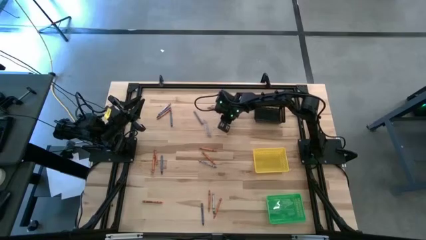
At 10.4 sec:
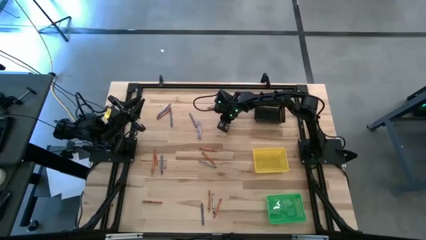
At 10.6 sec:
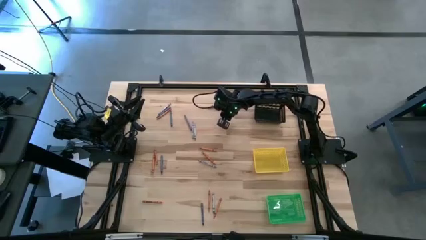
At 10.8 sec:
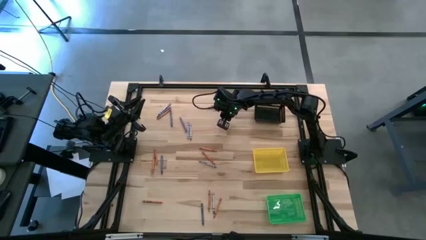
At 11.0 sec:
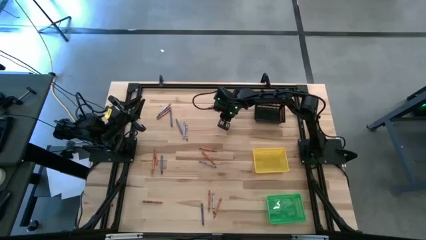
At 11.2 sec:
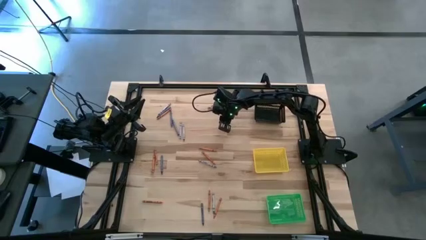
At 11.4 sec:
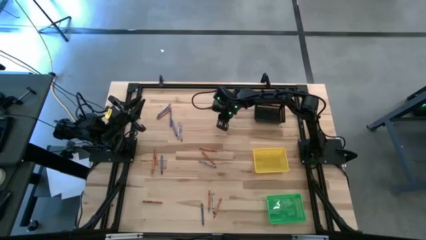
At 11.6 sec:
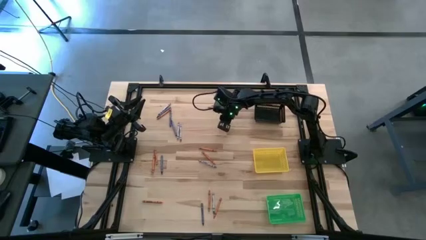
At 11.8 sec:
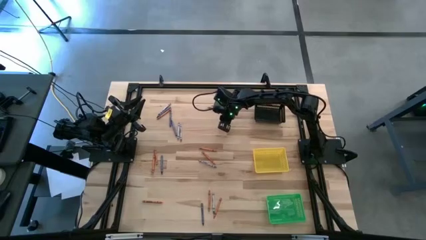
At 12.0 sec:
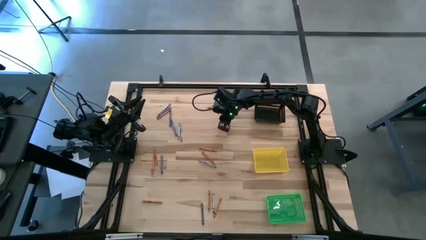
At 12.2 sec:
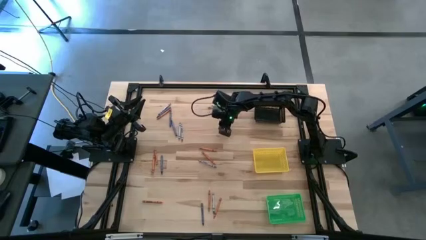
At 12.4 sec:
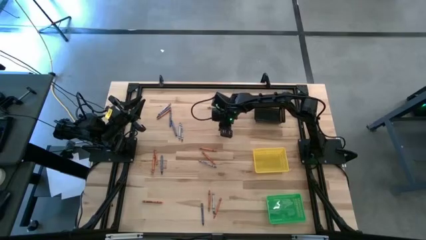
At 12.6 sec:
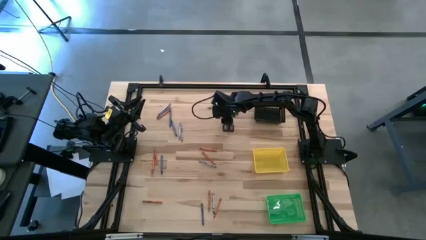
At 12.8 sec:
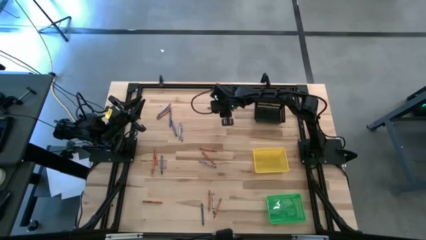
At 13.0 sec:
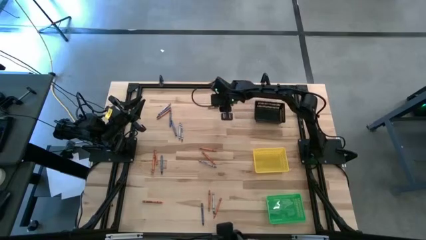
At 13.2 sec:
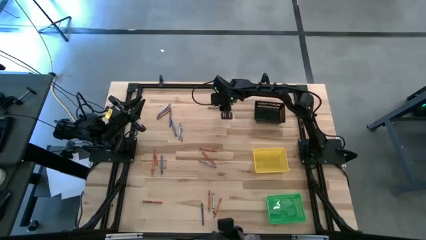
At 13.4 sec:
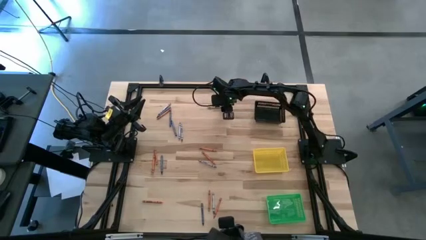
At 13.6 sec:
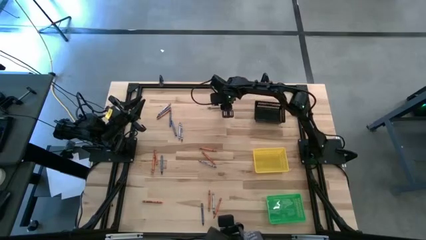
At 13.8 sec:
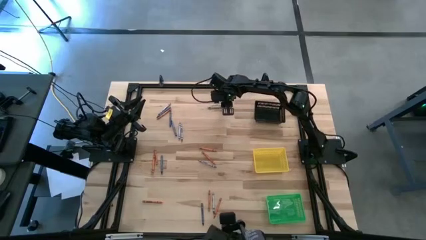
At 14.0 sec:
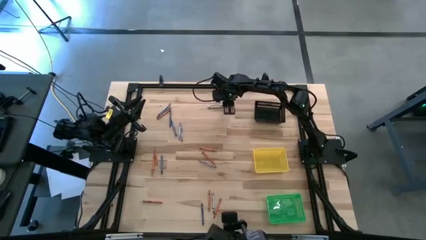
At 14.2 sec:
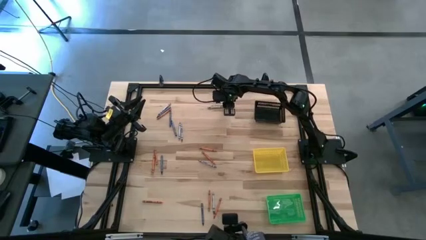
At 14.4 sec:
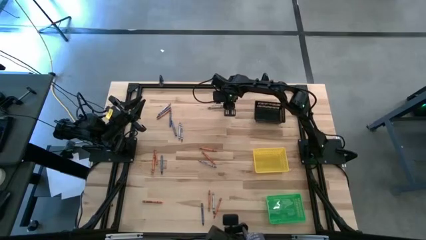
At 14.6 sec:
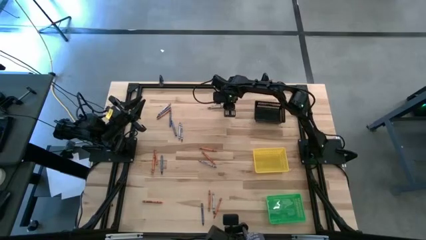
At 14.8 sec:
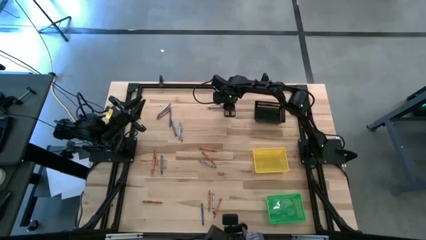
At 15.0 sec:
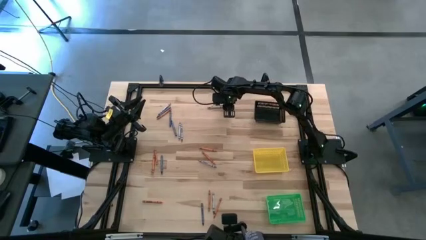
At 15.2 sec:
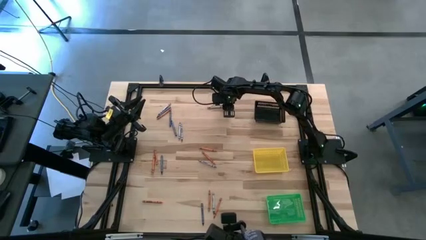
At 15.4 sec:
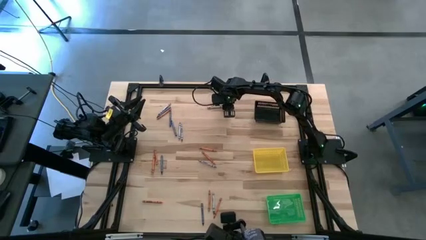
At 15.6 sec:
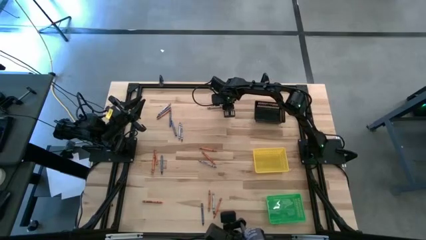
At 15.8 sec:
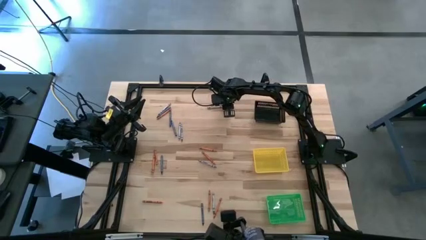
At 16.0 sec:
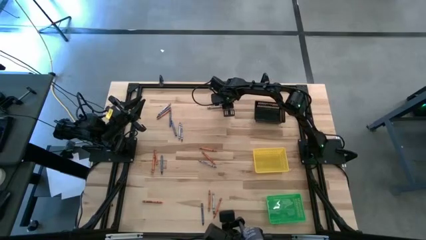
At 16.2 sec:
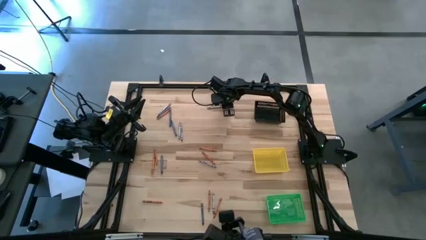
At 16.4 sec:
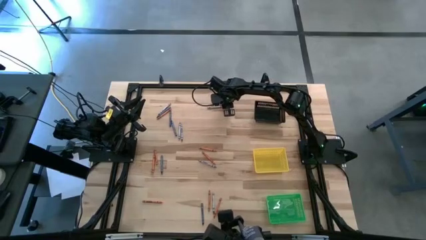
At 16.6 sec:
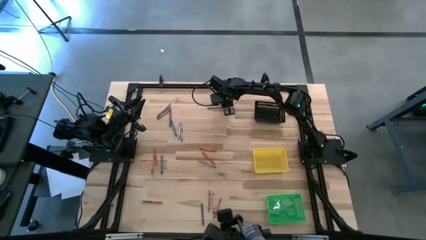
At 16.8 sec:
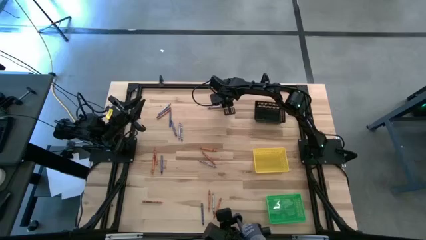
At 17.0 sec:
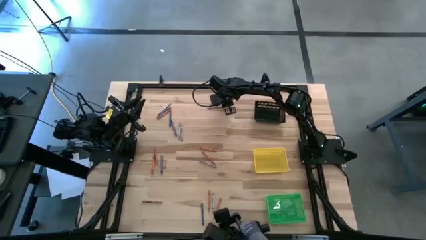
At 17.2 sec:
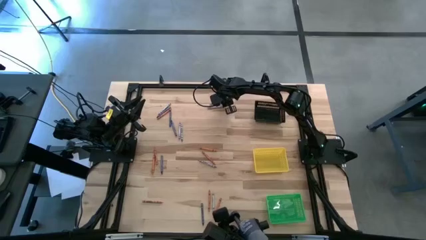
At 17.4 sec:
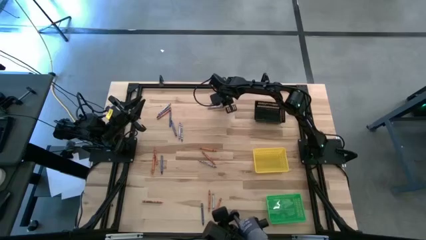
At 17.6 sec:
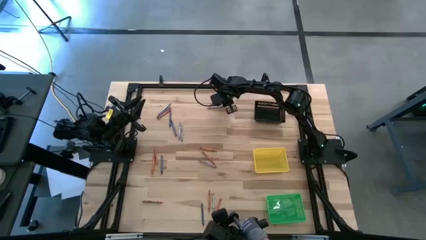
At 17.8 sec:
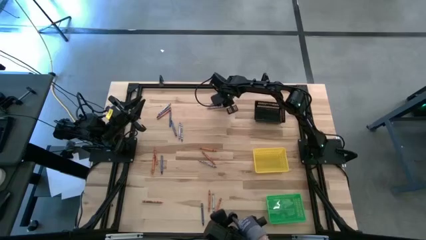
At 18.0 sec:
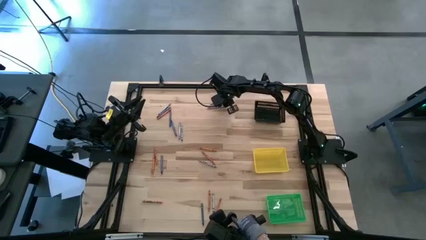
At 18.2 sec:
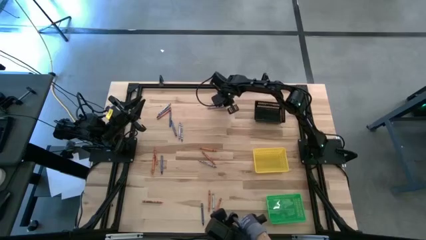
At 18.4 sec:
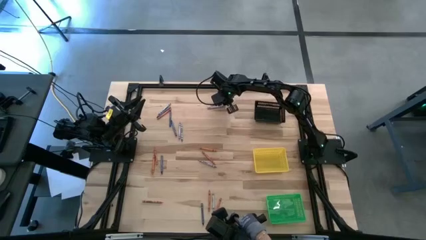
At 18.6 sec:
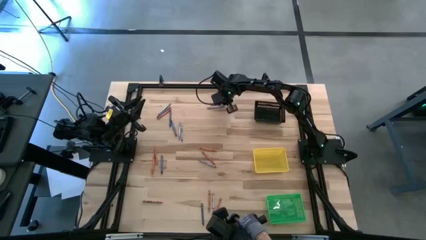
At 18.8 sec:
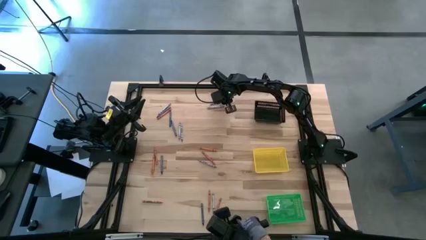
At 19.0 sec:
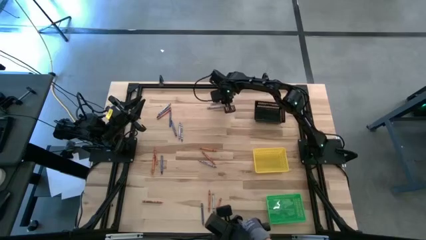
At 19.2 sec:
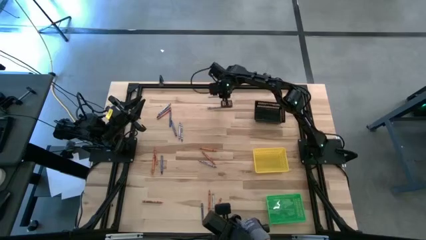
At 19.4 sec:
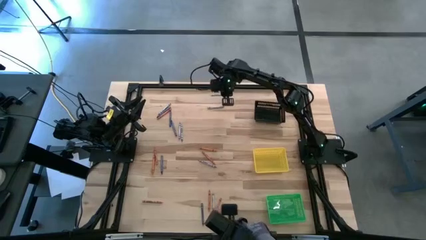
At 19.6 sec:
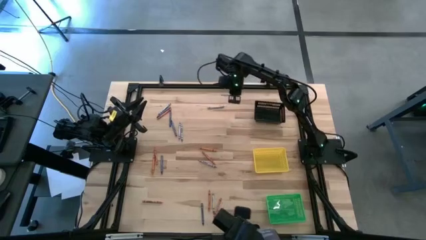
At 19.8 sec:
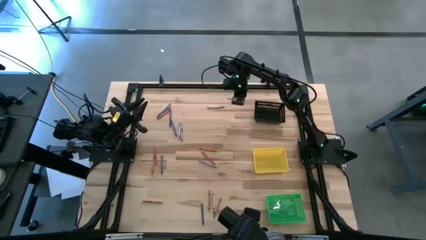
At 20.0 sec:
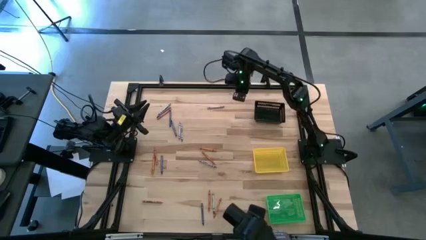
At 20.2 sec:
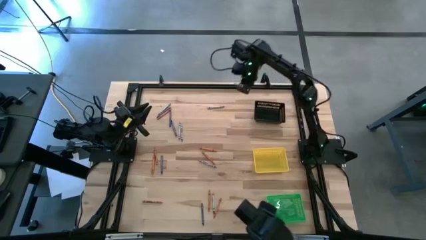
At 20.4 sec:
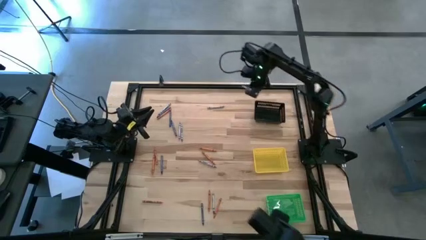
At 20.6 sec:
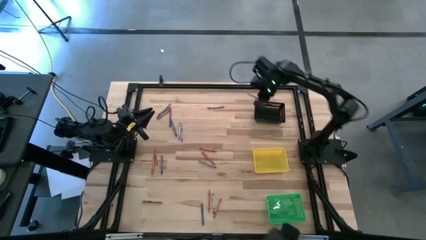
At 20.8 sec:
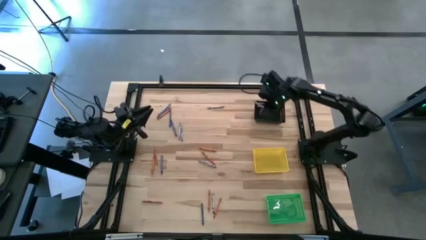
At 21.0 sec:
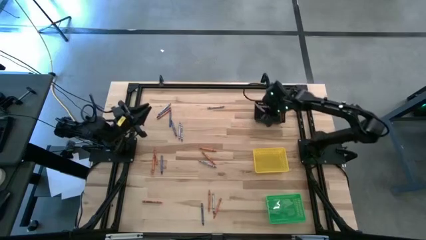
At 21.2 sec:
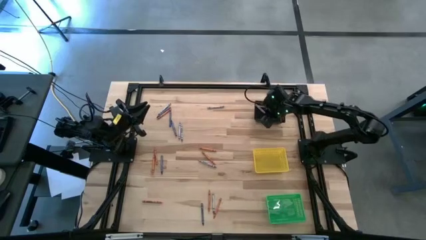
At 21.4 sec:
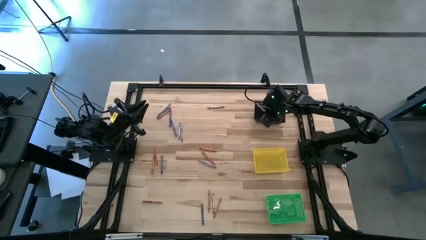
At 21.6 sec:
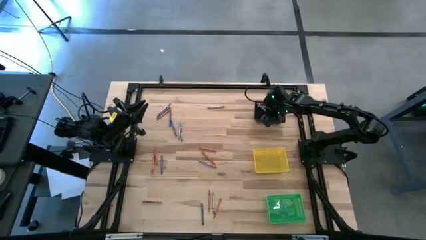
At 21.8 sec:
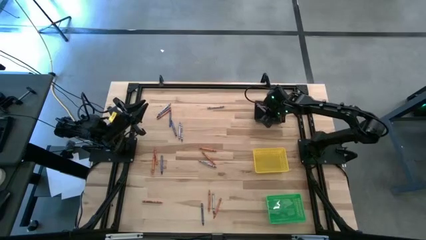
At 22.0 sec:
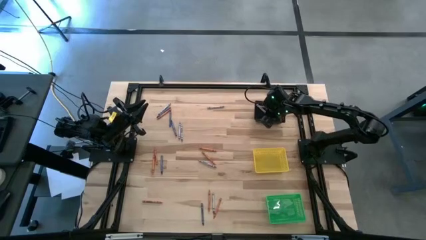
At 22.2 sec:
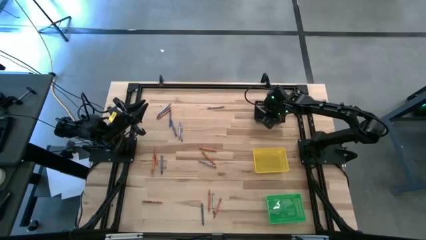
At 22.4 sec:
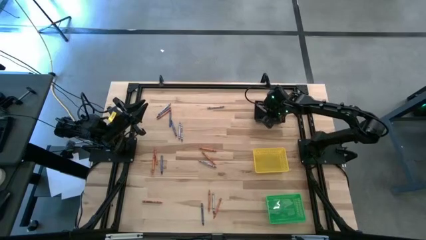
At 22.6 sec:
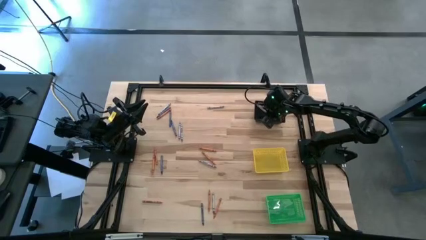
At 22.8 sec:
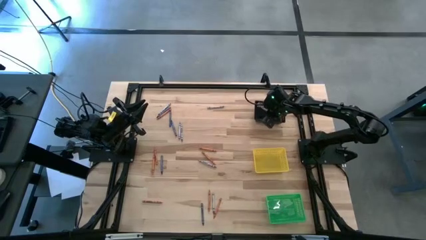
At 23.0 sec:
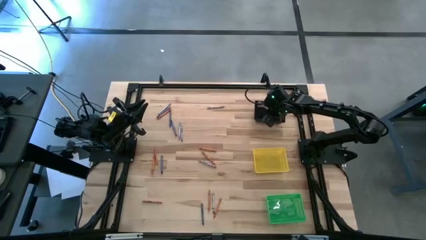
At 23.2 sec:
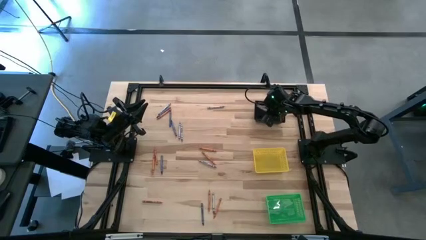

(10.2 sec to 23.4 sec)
Task: Sort crayons
Put the gray crayon into the black basket
